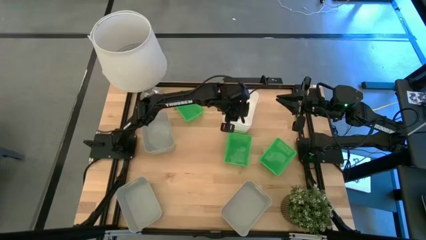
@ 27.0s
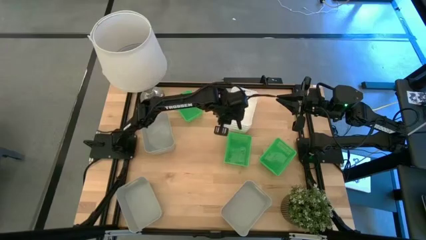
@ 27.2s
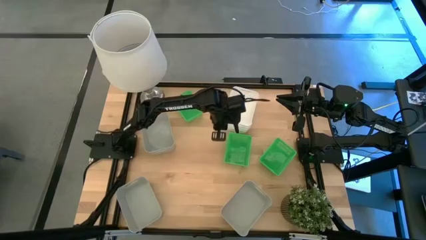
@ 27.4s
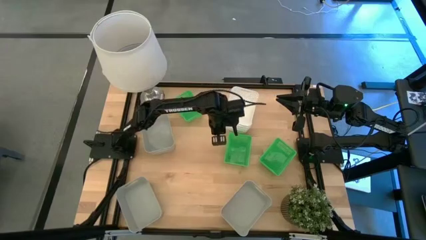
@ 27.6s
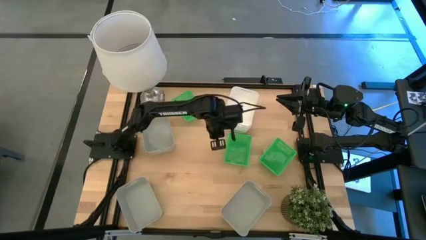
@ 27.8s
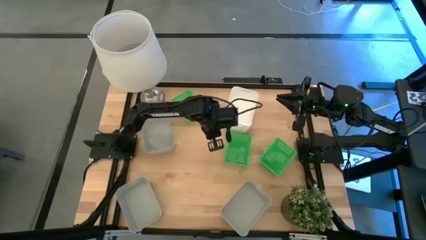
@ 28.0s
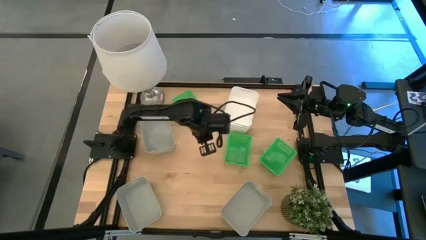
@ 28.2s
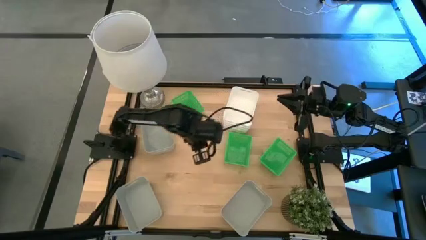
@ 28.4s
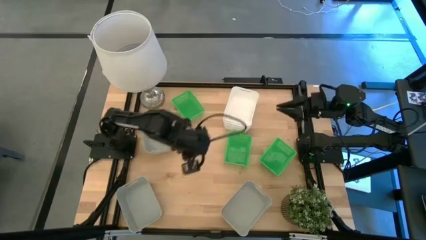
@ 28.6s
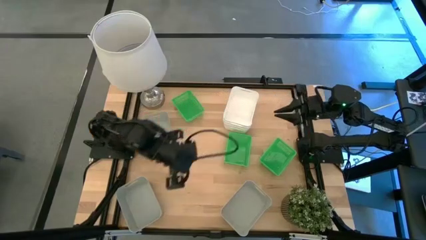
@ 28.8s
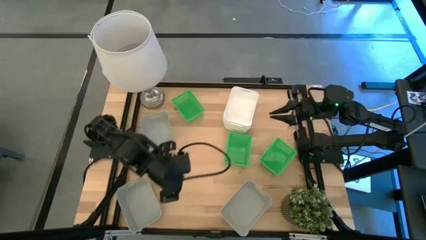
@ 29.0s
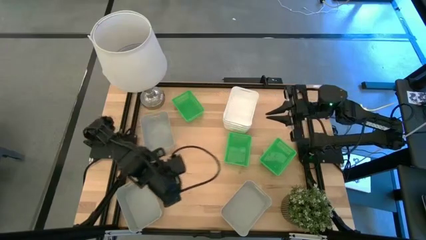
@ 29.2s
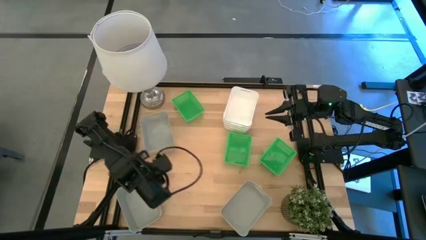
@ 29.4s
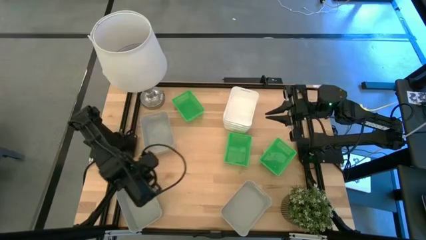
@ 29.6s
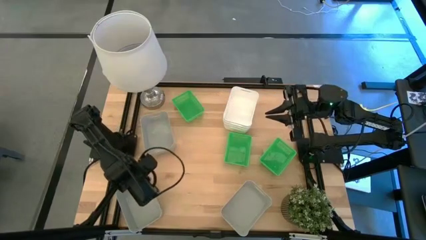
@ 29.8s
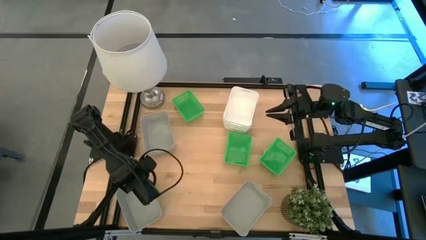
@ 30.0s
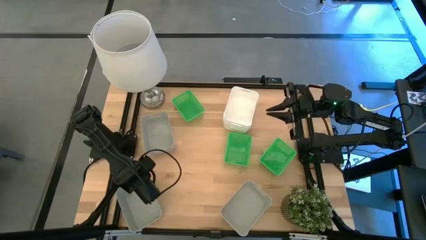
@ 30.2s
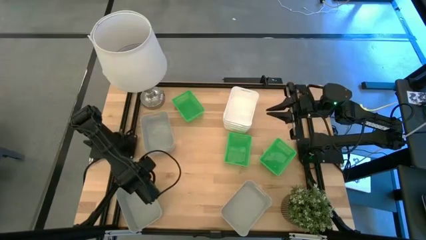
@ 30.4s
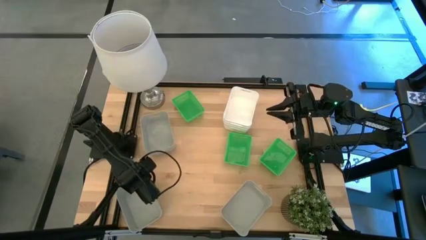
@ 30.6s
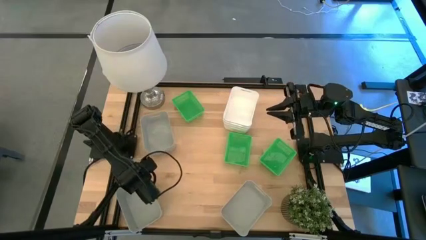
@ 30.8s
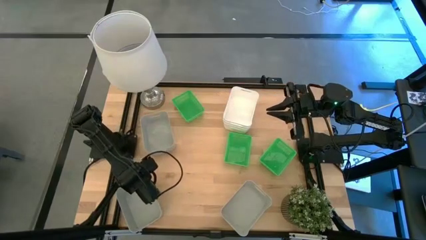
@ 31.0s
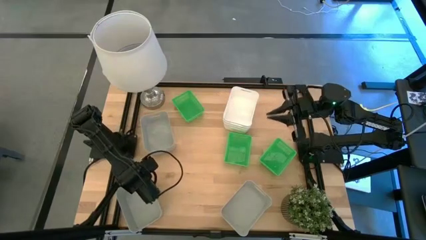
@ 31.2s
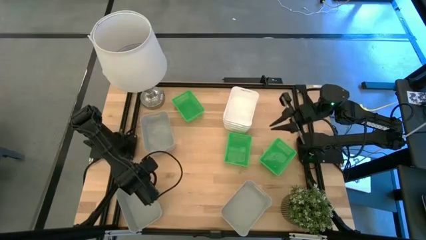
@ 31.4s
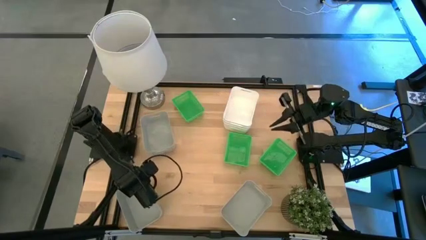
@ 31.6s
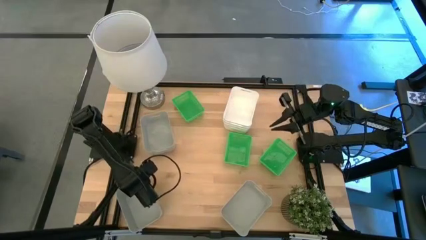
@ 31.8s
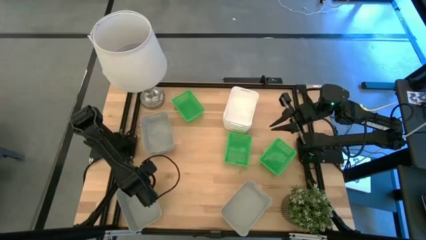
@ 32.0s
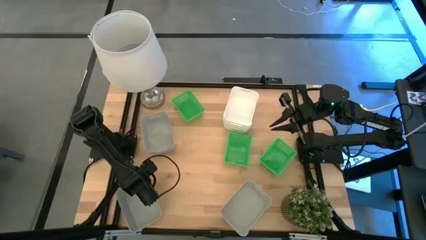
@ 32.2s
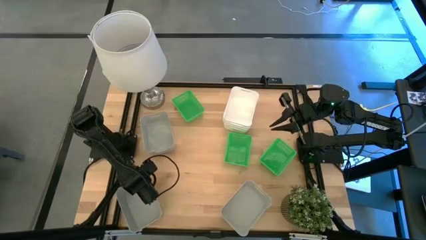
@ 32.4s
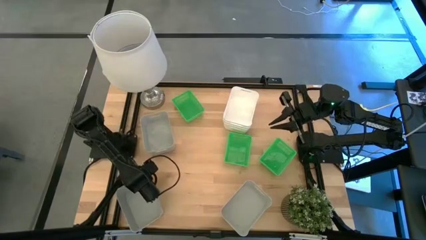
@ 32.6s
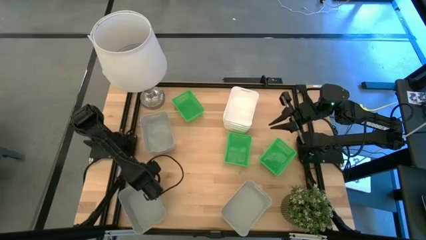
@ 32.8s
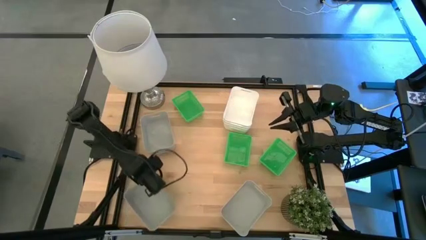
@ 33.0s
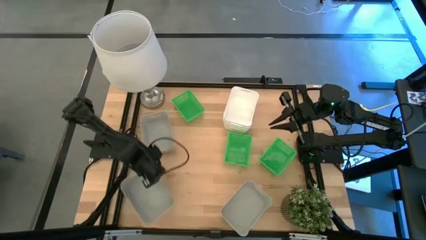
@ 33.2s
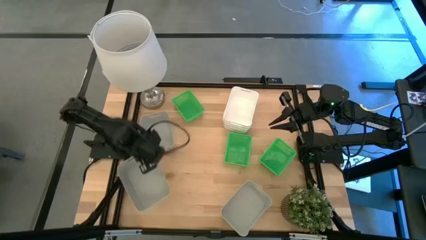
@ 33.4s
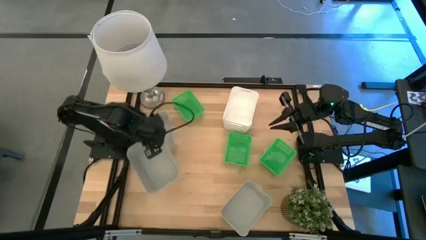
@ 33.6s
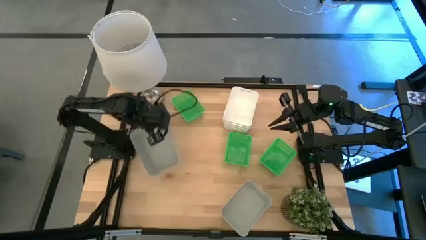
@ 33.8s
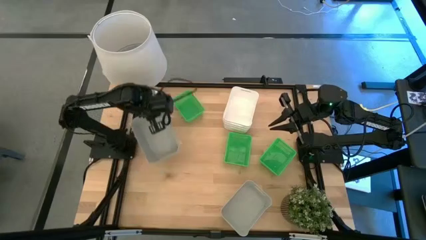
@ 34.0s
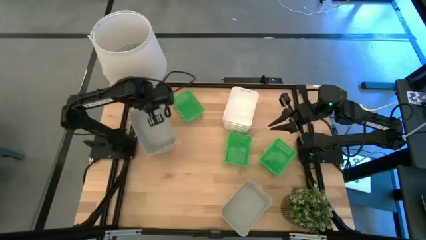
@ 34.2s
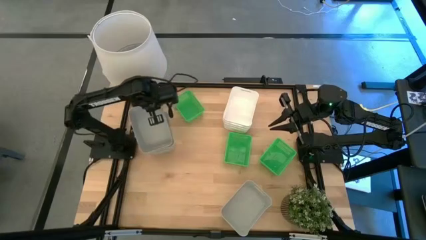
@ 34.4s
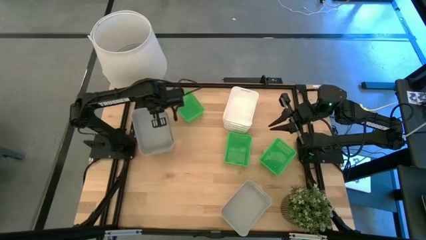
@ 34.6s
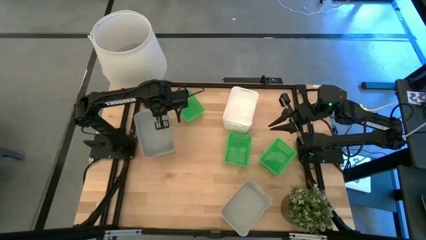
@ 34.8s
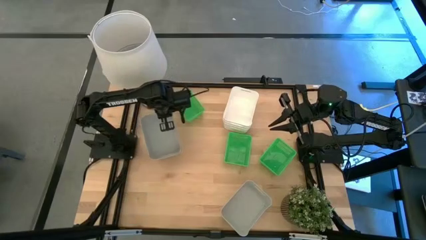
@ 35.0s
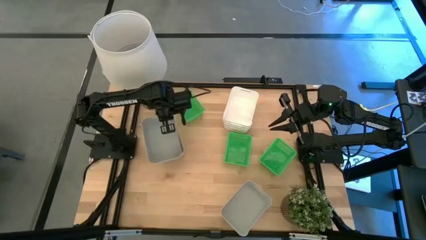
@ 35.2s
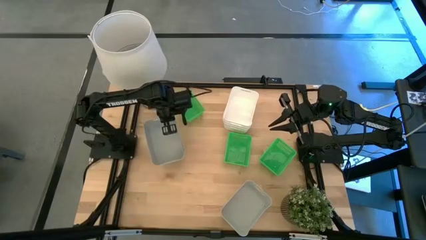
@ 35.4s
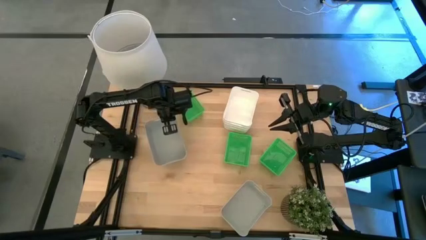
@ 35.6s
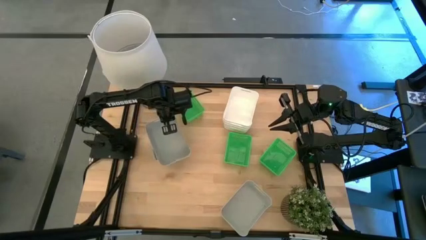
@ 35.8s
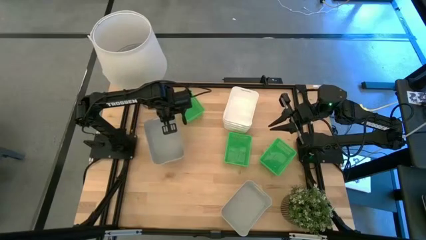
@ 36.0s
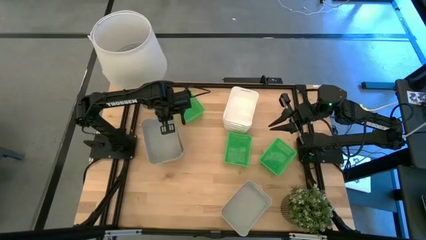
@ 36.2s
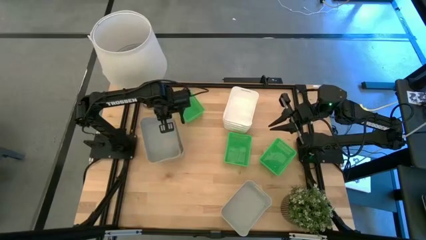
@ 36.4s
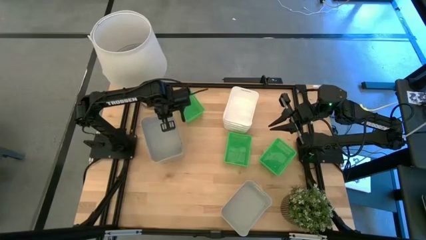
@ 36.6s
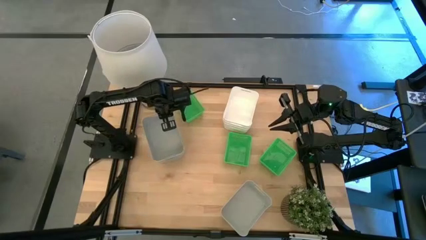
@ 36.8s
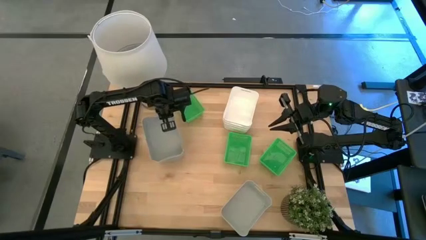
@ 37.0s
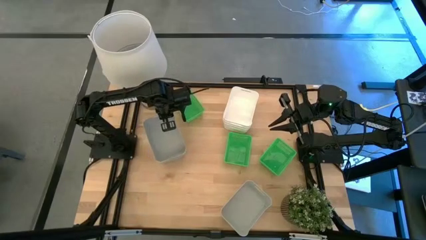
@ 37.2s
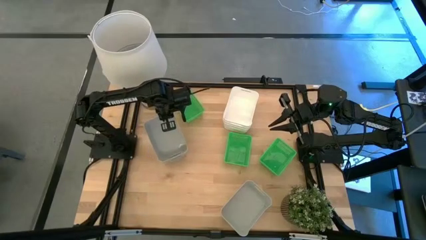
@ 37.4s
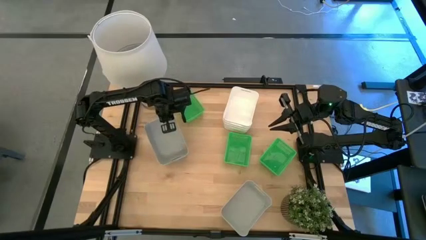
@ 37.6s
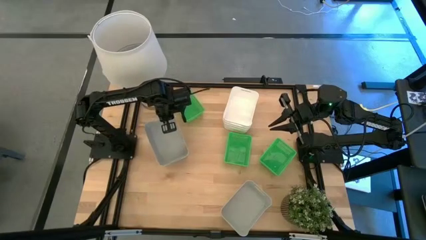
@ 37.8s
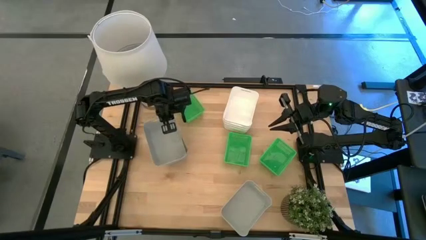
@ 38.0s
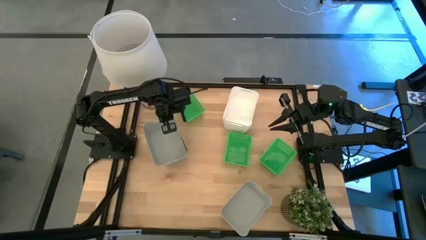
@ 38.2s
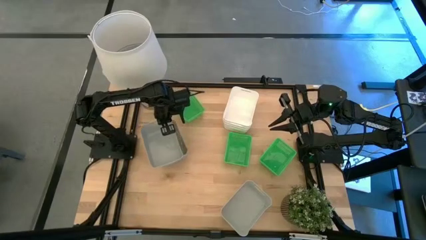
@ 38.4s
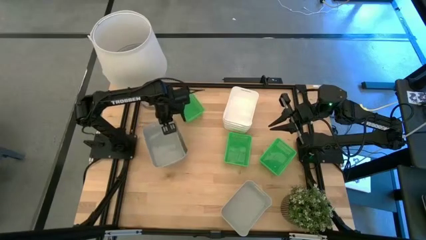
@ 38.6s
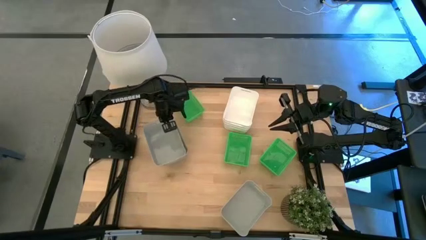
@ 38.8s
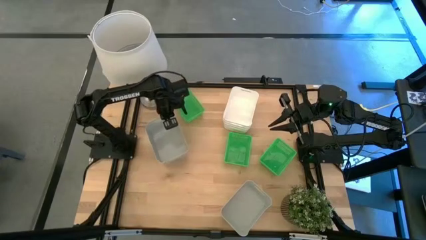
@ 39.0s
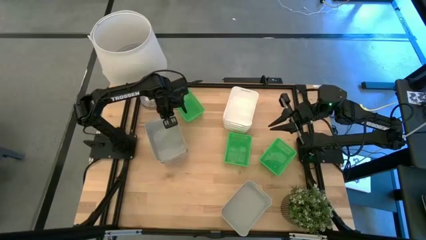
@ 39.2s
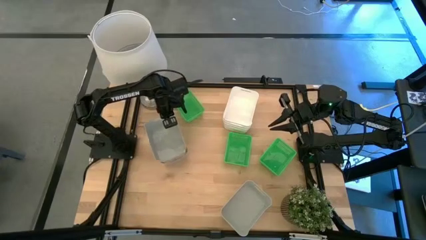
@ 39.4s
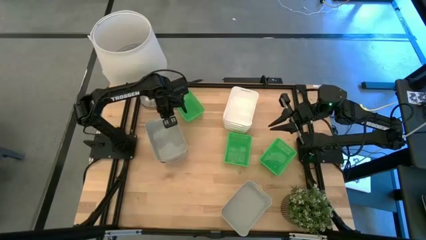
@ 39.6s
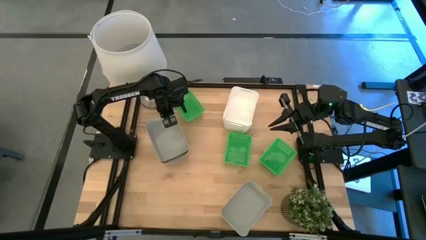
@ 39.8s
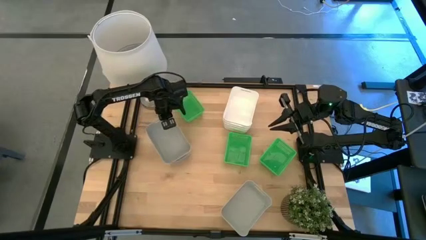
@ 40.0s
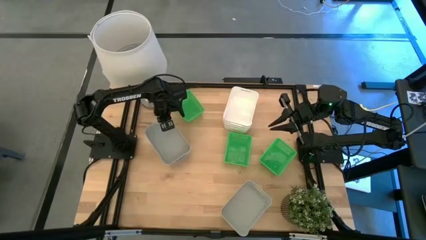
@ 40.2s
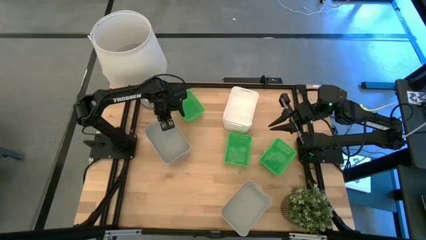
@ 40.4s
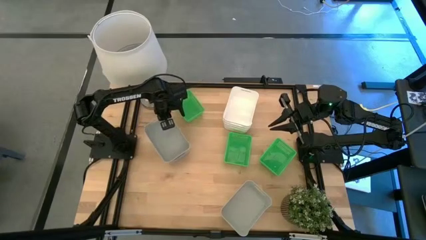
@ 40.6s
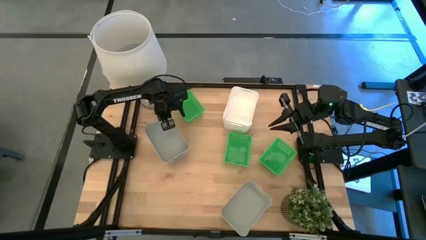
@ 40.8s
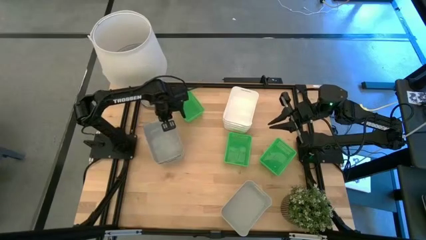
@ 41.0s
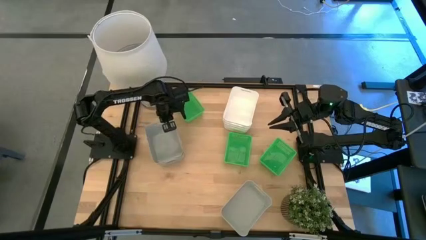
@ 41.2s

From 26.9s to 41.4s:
Stack the bottom left gray bin on top of the top left gray bin
